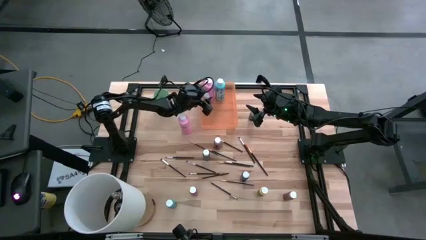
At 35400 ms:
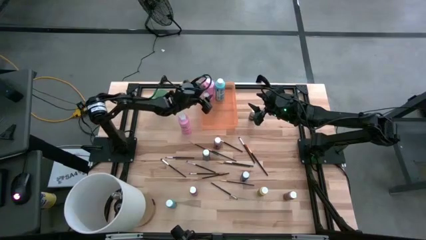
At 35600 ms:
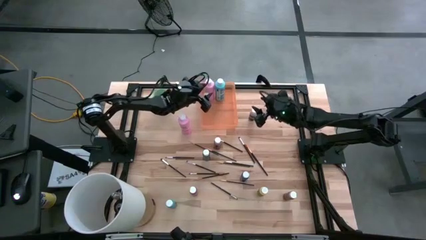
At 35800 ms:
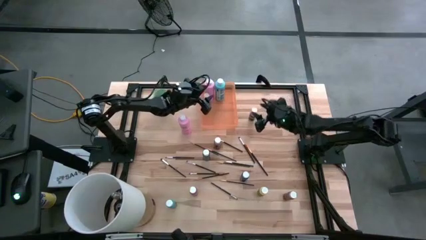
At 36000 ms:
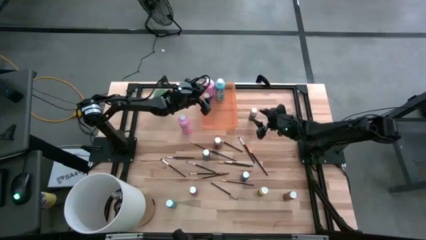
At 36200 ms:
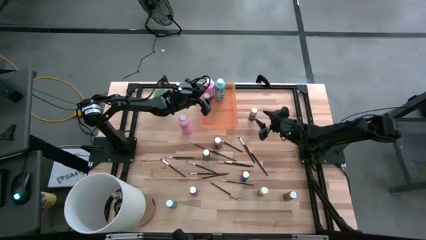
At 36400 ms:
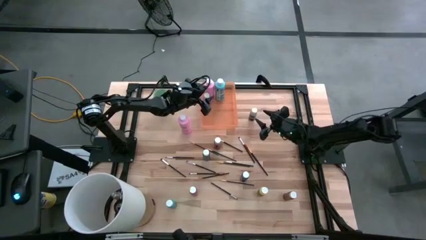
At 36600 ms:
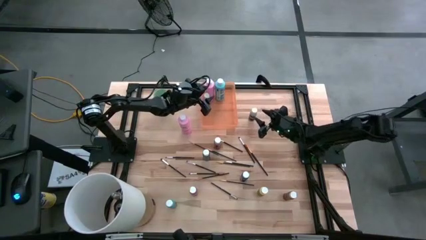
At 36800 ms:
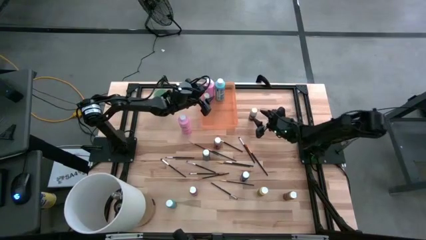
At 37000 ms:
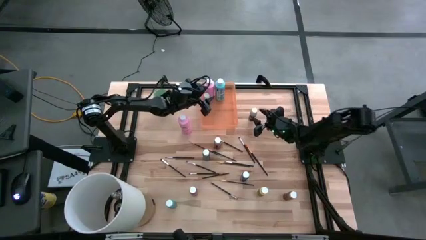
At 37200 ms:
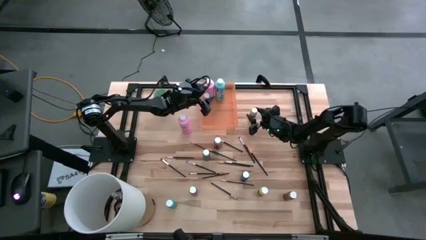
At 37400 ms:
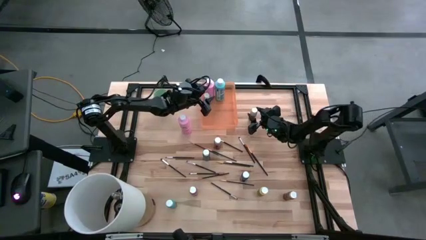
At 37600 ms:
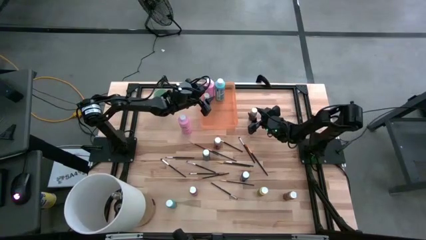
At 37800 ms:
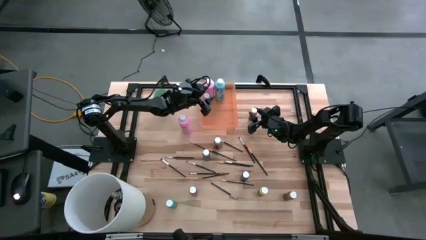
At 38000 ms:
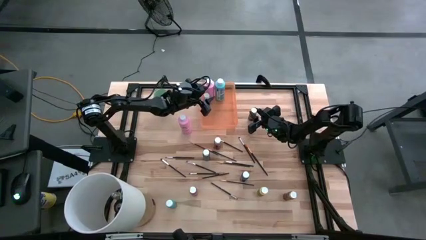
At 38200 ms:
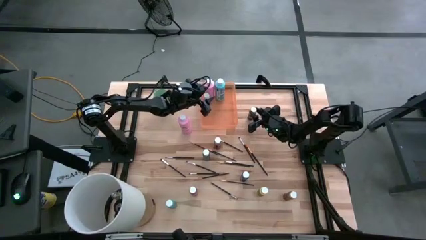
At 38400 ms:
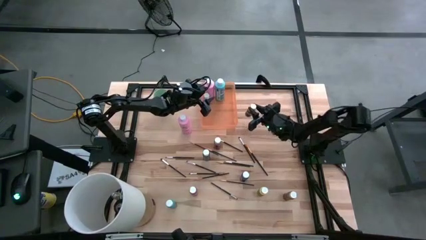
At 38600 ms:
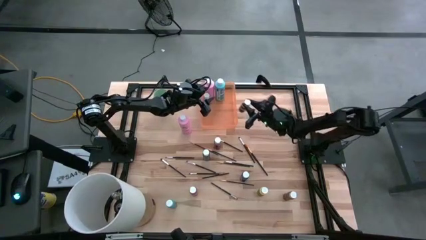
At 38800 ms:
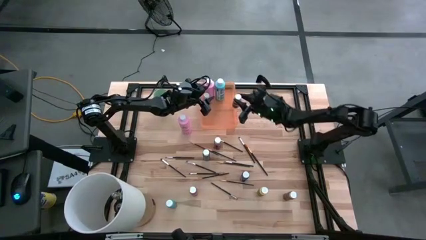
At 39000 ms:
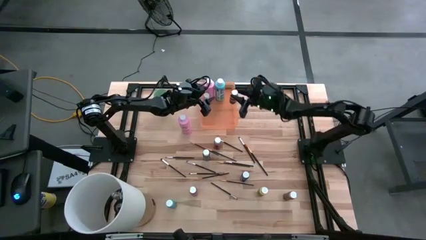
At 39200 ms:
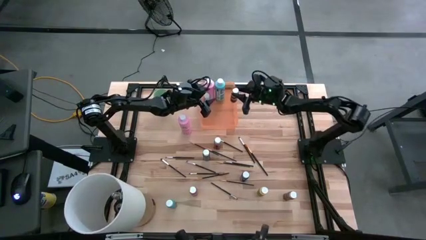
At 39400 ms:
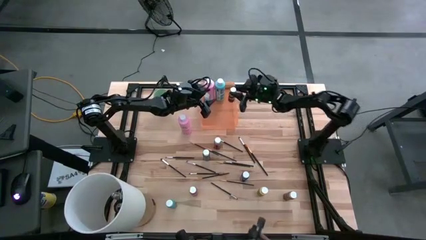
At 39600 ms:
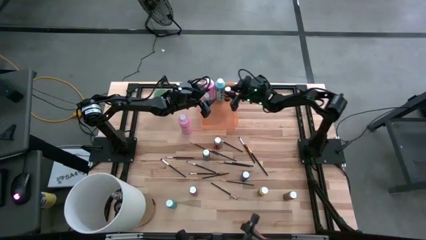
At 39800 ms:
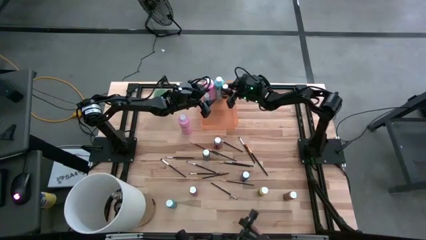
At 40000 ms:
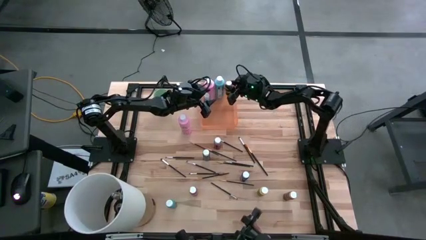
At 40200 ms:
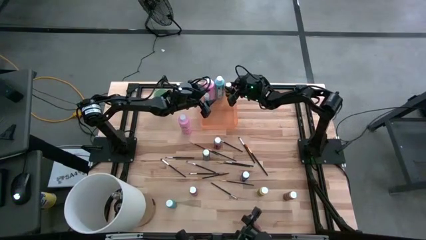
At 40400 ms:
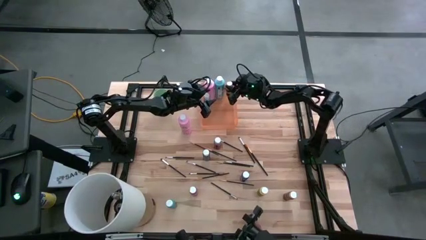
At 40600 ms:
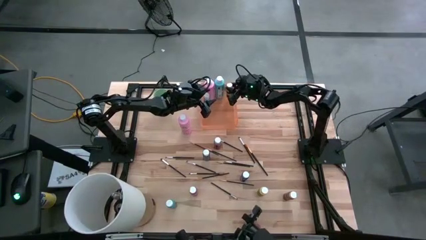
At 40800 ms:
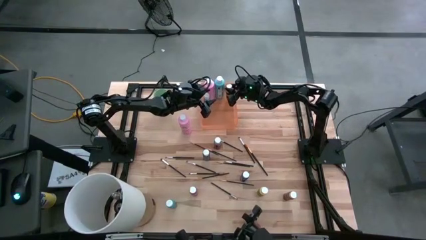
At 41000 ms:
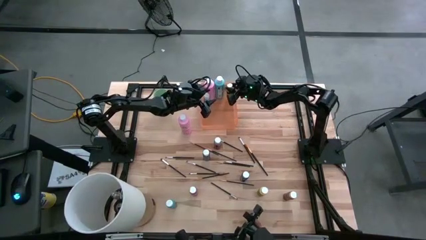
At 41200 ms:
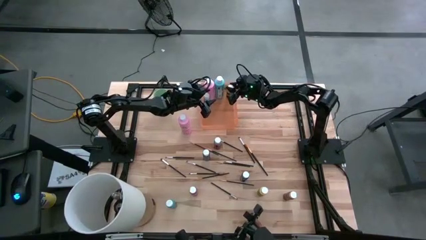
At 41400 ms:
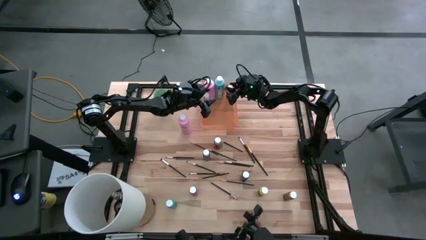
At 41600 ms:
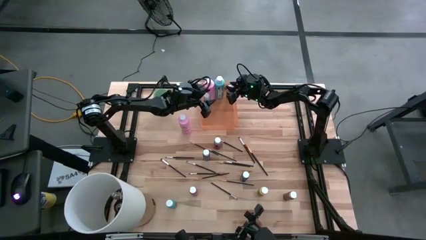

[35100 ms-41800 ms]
Task: Pick & Place Paint Supplies
Put the gray paint bottle into the orange bin

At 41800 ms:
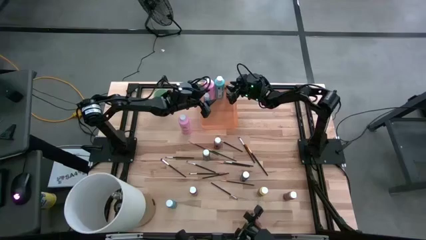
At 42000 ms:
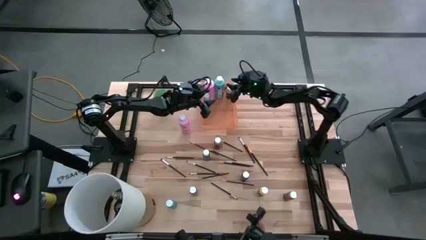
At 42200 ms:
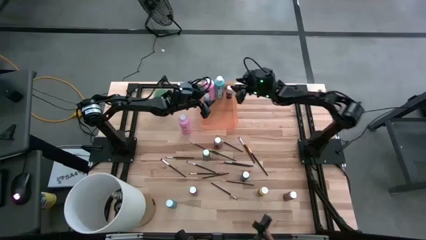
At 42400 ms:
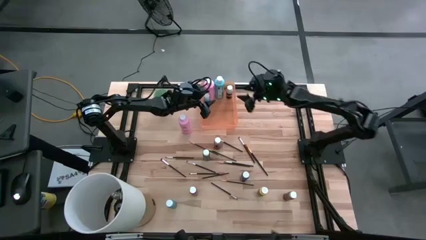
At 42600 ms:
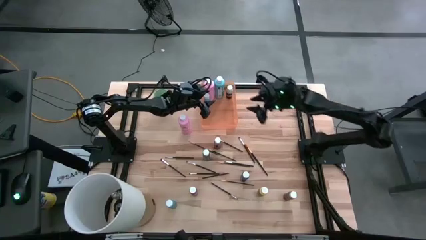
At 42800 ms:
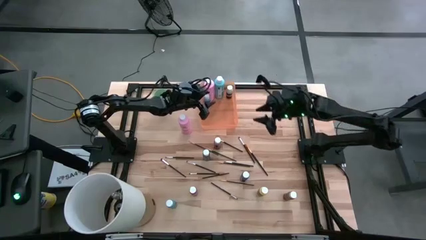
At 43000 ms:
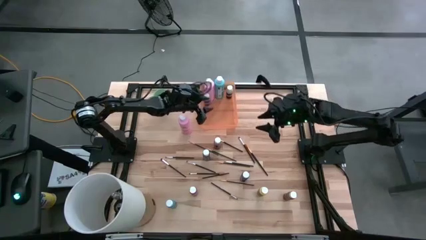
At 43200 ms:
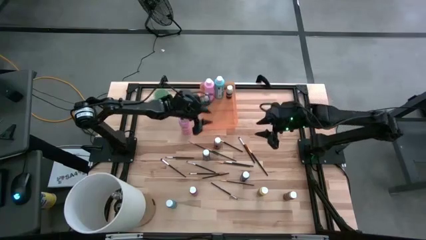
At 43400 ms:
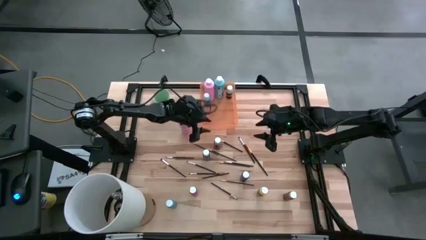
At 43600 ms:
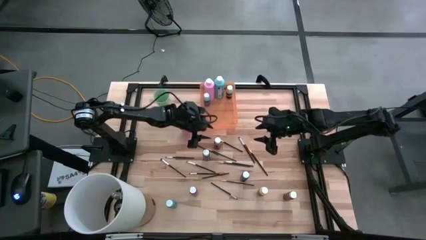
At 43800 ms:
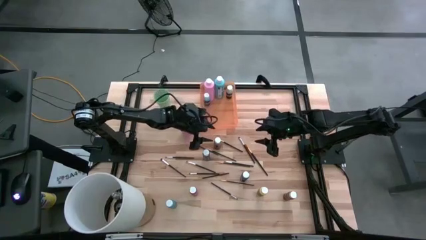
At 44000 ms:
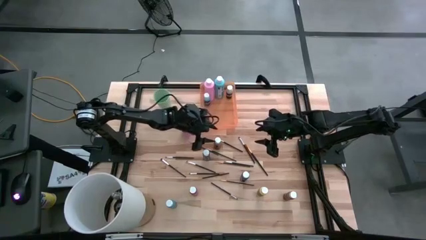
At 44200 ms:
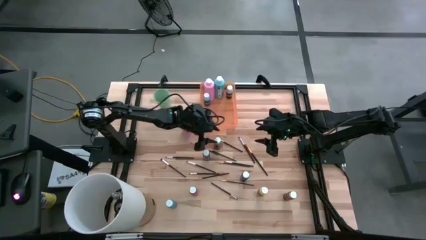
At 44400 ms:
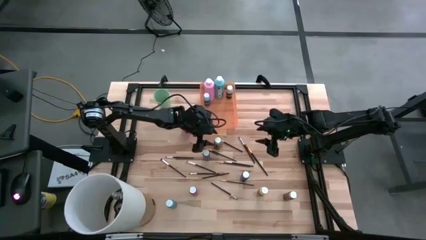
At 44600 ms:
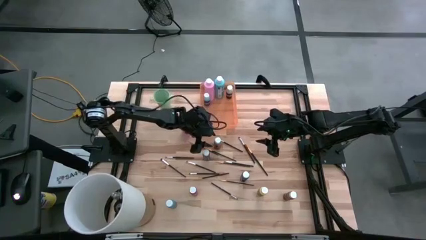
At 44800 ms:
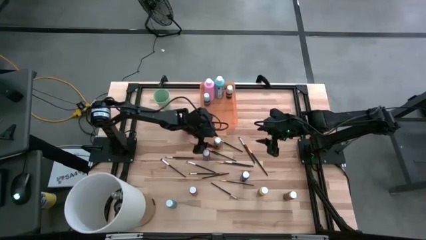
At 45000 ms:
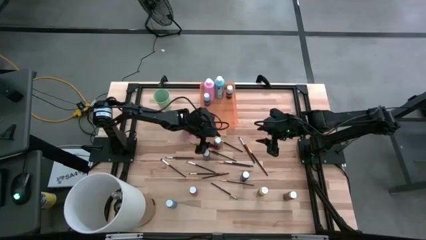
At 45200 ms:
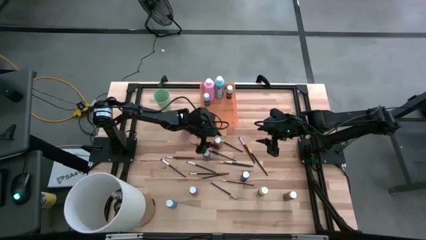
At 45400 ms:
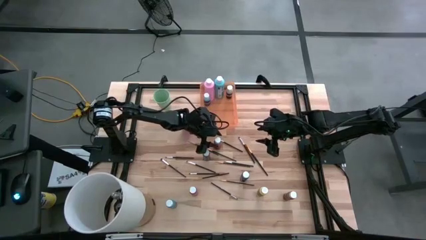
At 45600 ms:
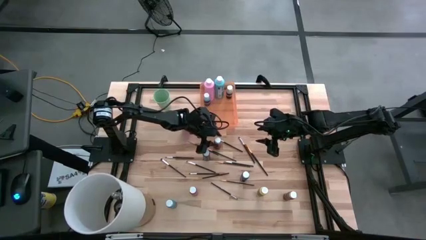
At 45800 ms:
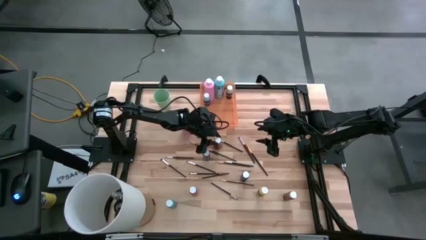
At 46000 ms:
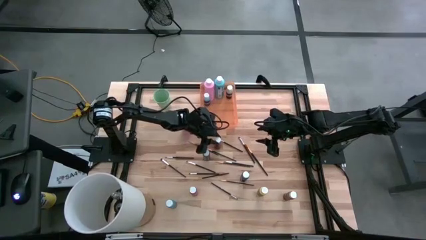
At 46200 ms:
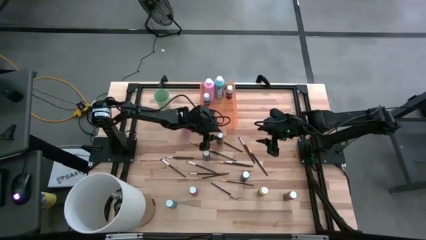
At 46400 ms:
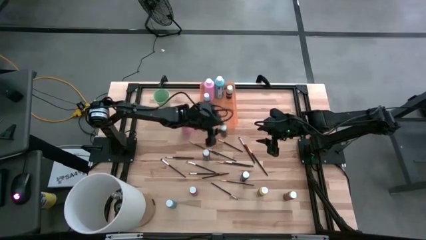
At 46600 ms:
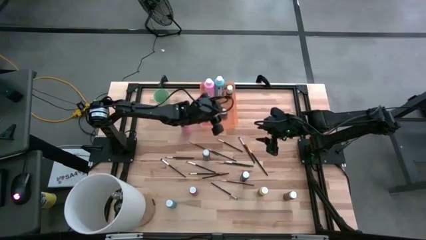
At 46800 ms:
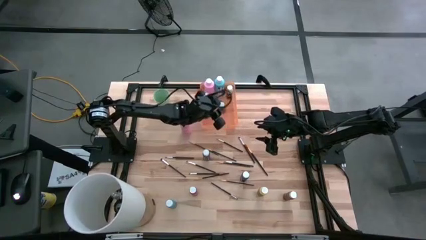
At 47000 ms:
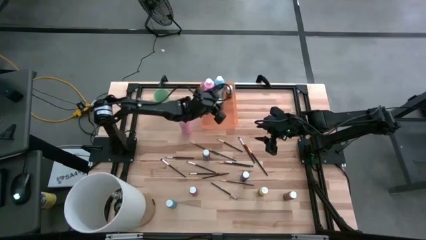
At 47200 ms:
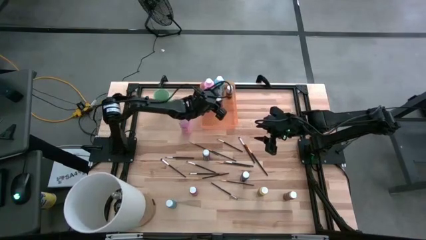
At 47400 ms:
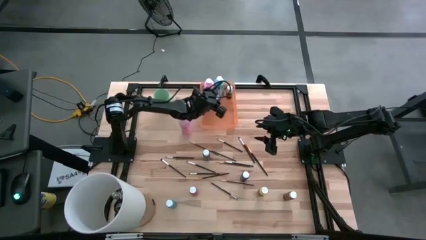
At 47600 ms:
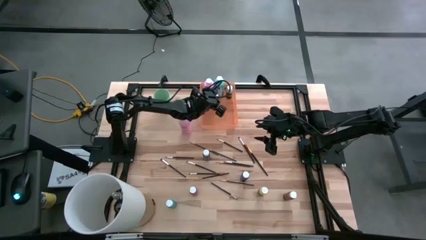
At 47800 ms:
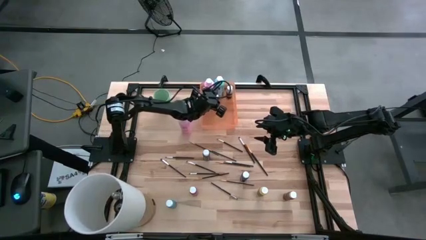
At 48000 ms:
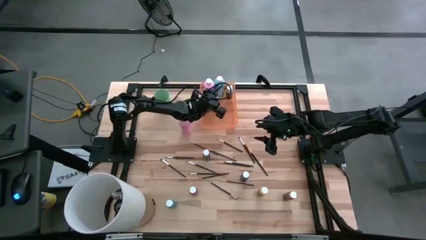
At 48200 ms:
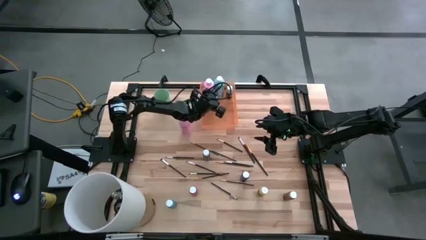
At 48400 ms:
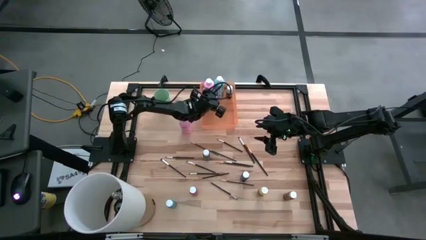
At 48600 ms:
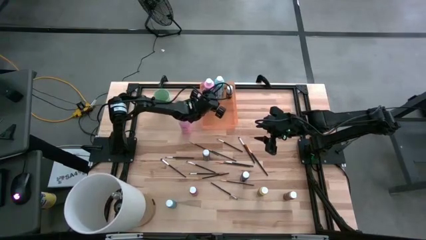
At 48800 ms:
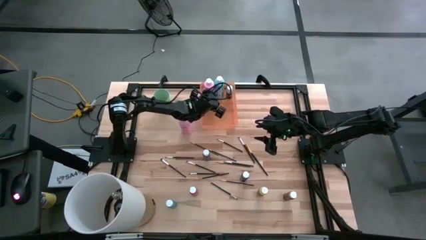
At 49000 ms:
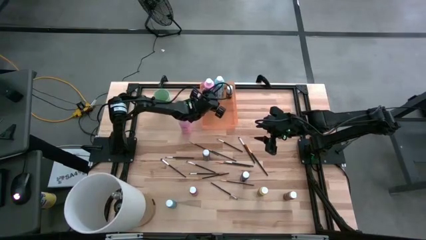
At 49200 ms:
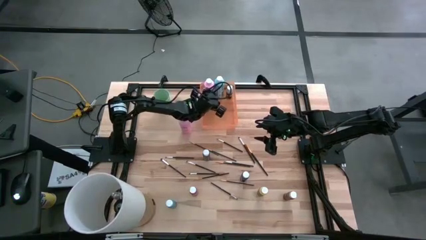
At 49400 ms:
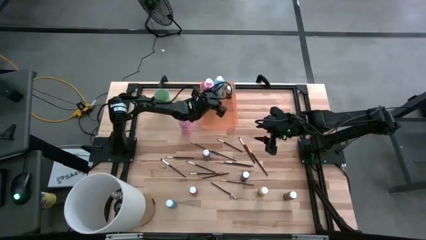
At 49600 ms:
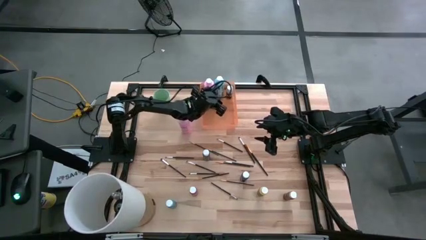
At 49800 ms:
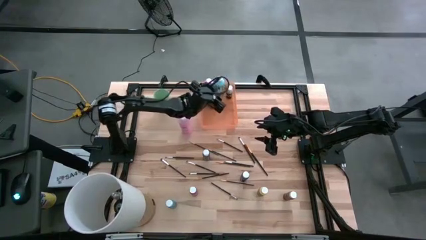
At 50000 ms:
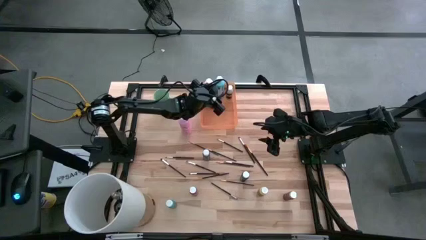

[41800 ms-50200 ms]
Put the brown paint bottle into the orange bin
